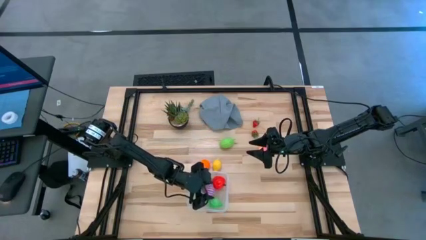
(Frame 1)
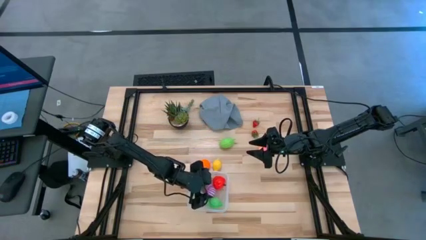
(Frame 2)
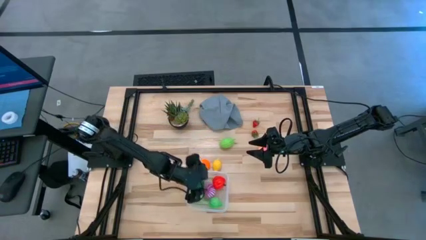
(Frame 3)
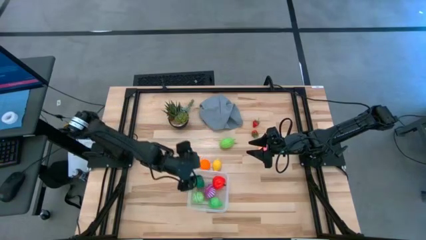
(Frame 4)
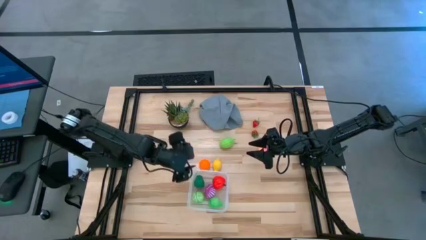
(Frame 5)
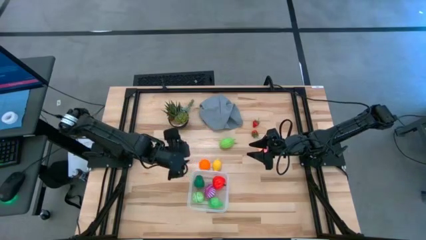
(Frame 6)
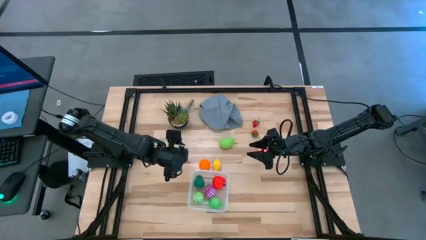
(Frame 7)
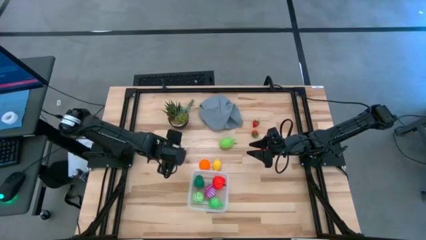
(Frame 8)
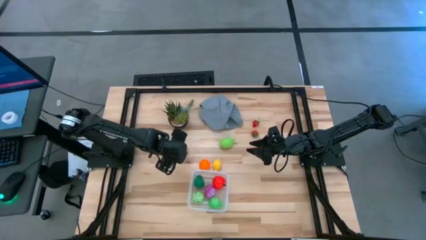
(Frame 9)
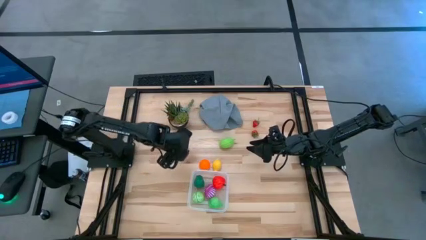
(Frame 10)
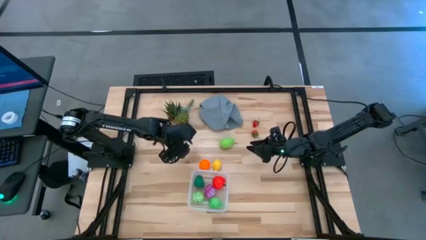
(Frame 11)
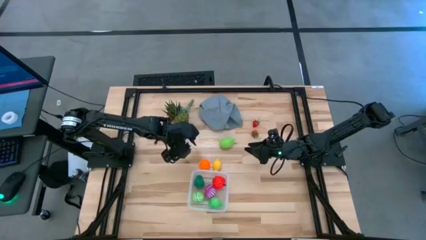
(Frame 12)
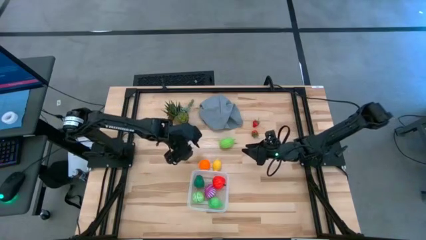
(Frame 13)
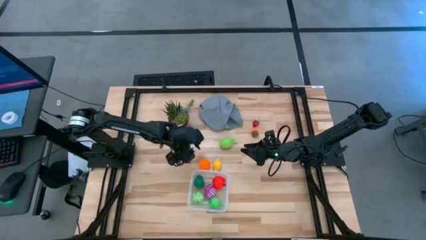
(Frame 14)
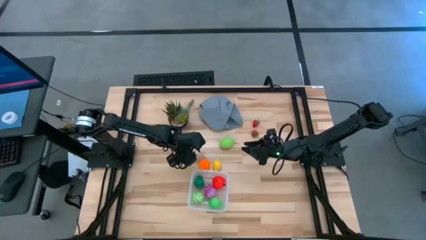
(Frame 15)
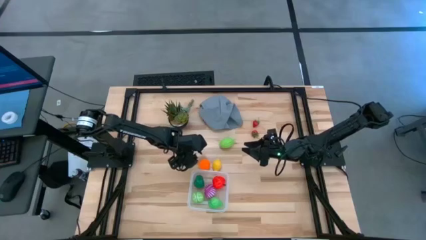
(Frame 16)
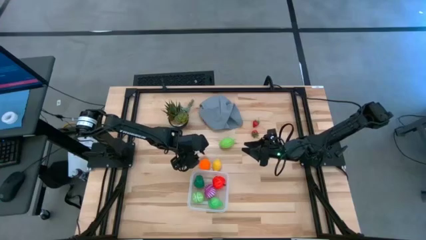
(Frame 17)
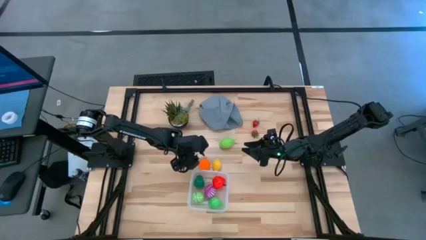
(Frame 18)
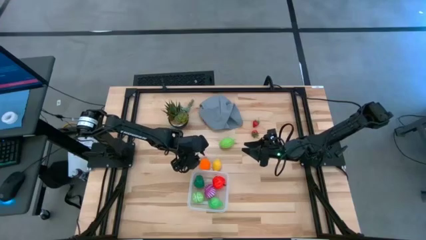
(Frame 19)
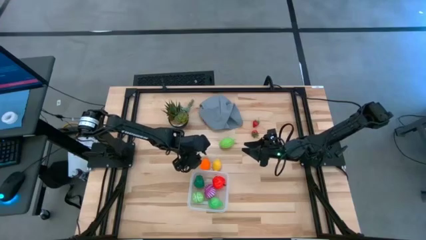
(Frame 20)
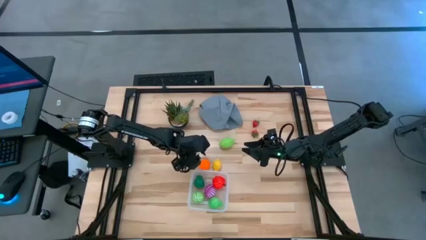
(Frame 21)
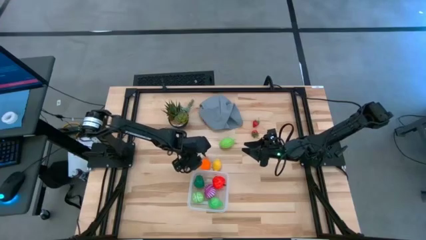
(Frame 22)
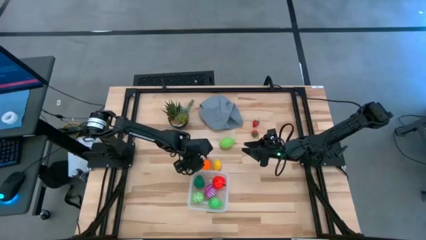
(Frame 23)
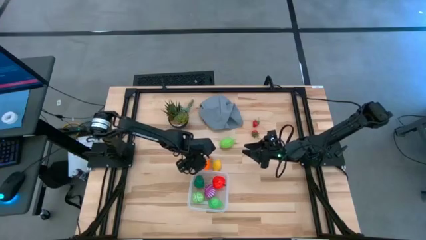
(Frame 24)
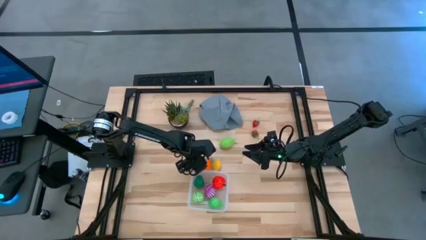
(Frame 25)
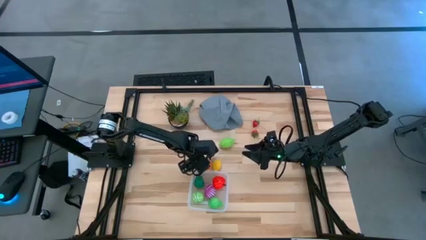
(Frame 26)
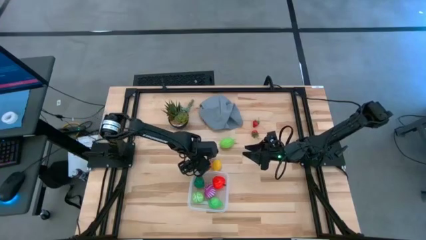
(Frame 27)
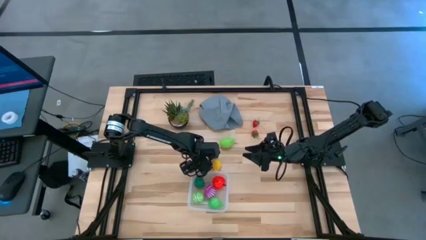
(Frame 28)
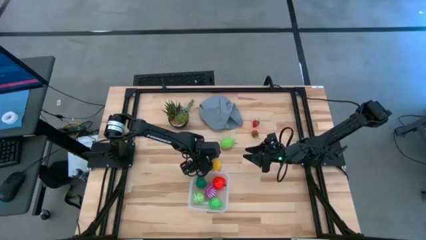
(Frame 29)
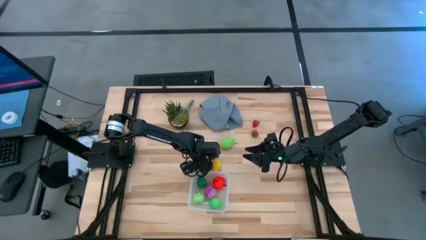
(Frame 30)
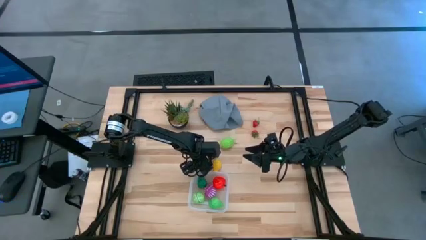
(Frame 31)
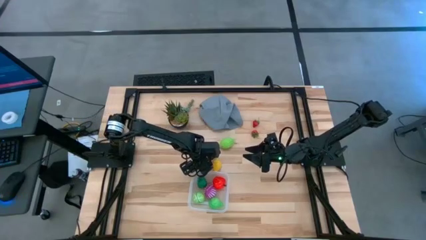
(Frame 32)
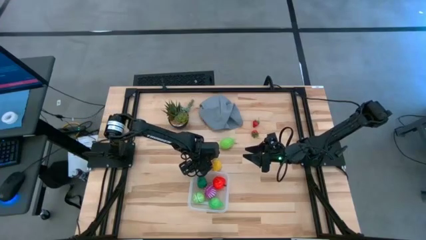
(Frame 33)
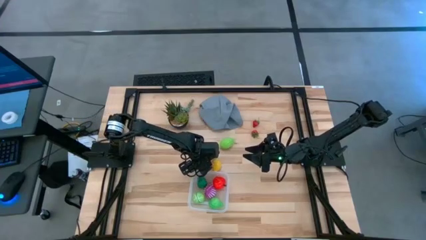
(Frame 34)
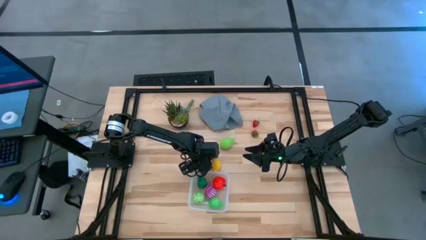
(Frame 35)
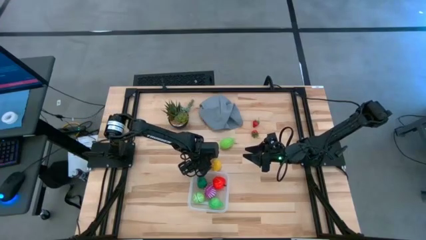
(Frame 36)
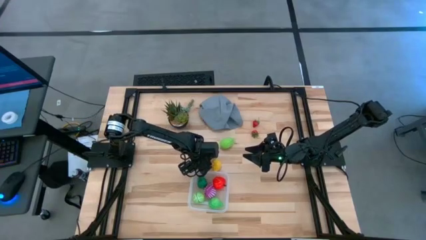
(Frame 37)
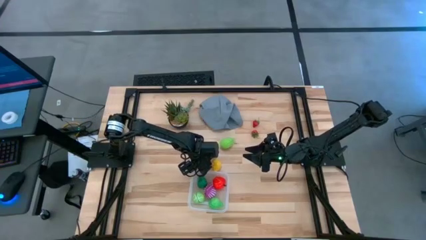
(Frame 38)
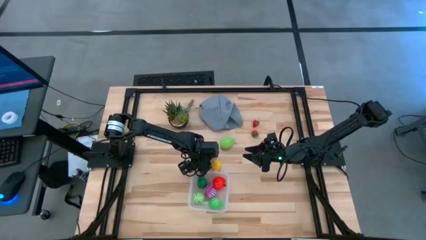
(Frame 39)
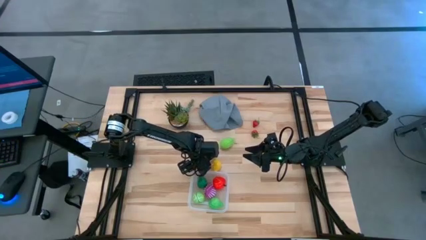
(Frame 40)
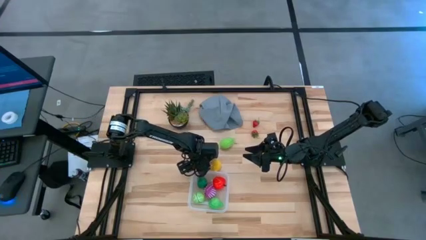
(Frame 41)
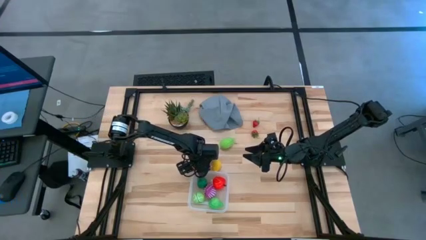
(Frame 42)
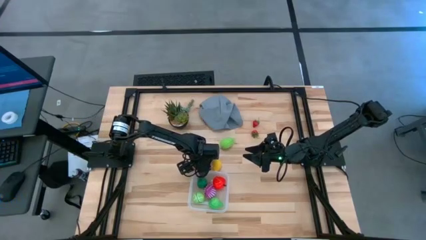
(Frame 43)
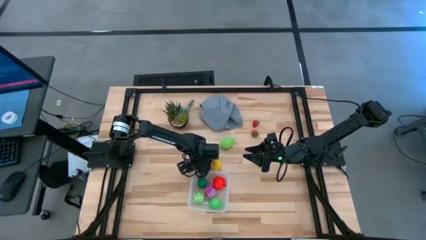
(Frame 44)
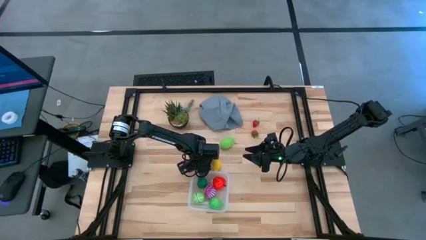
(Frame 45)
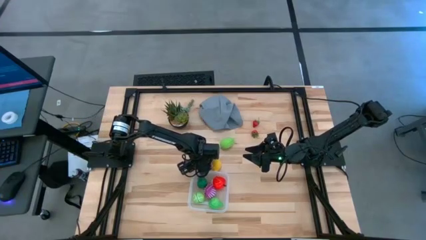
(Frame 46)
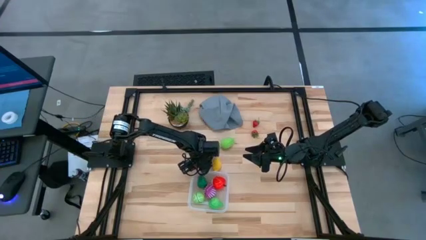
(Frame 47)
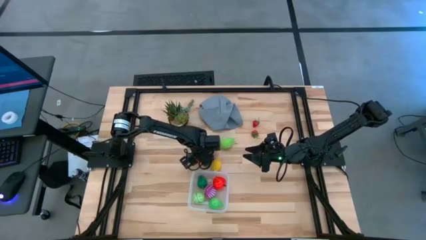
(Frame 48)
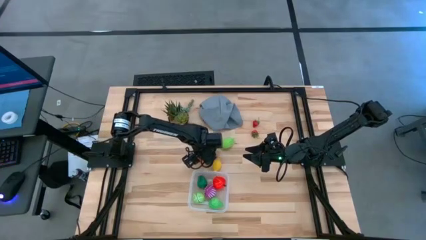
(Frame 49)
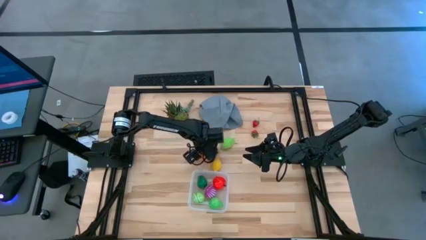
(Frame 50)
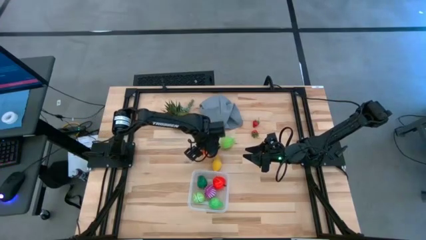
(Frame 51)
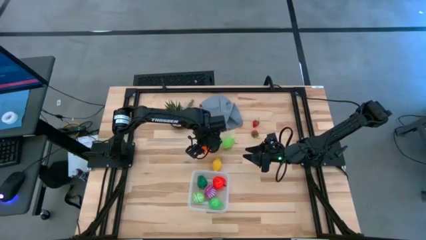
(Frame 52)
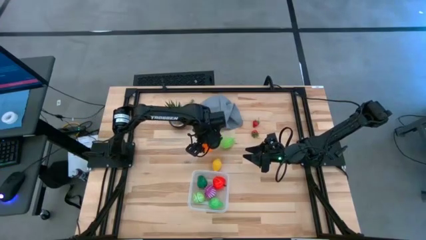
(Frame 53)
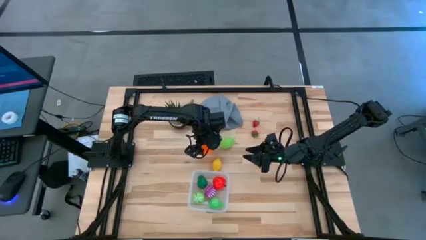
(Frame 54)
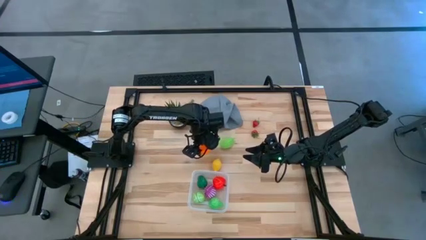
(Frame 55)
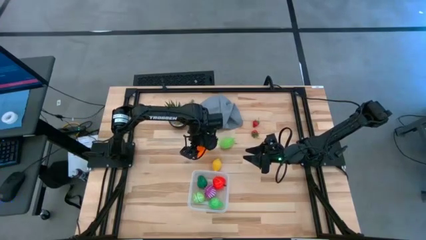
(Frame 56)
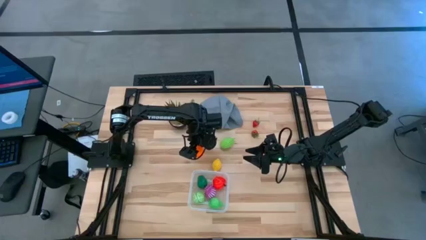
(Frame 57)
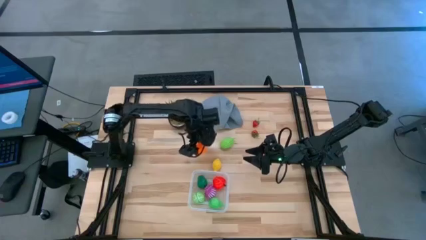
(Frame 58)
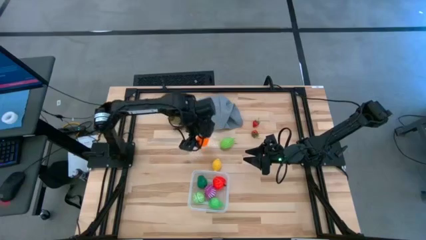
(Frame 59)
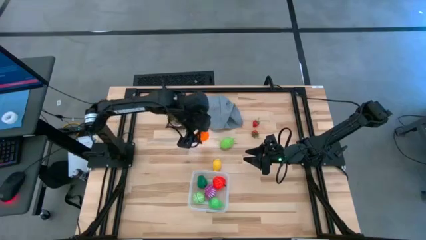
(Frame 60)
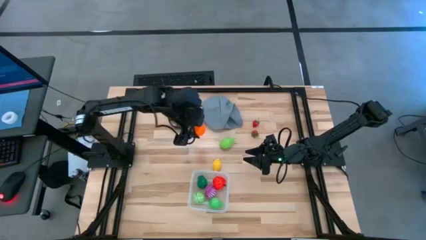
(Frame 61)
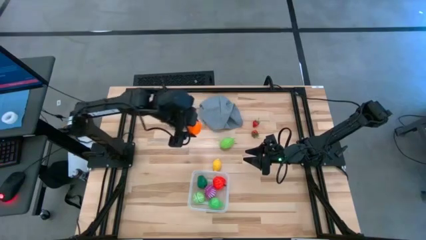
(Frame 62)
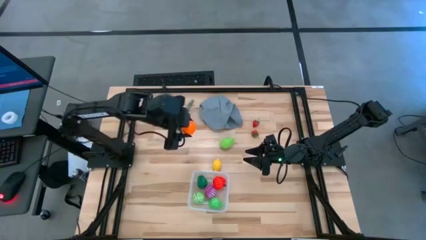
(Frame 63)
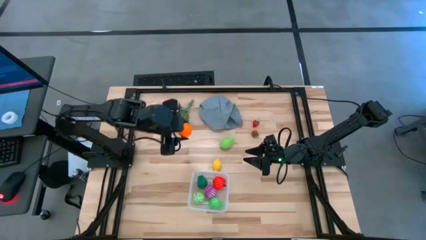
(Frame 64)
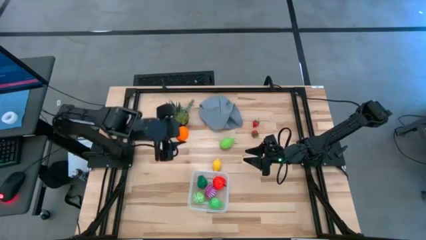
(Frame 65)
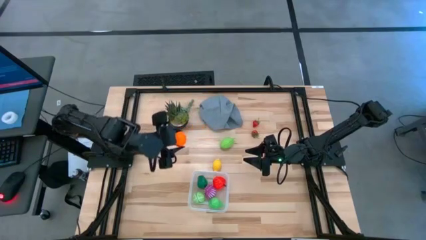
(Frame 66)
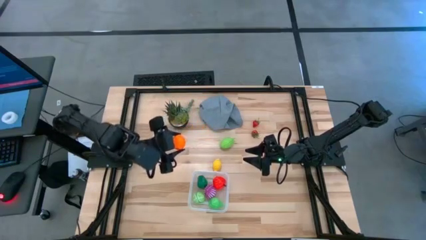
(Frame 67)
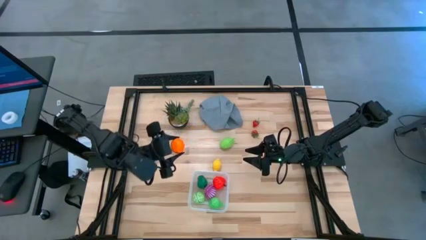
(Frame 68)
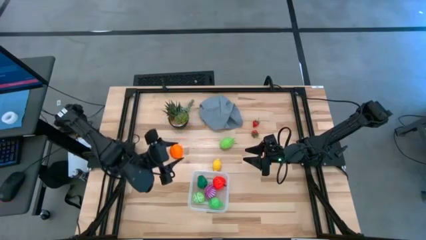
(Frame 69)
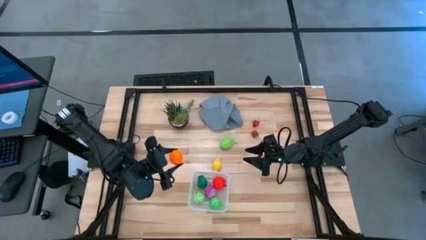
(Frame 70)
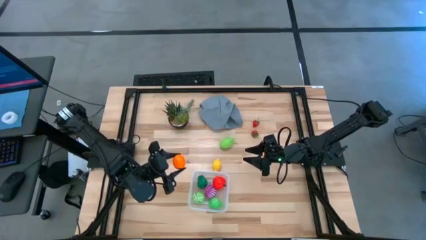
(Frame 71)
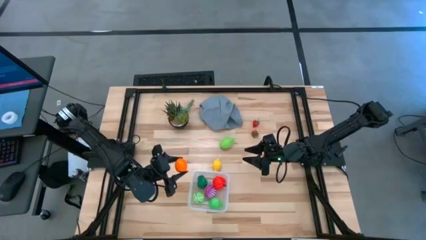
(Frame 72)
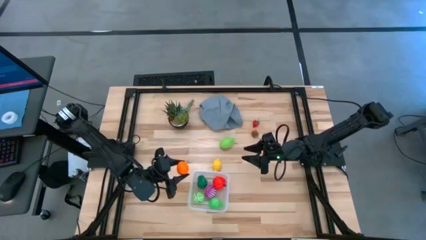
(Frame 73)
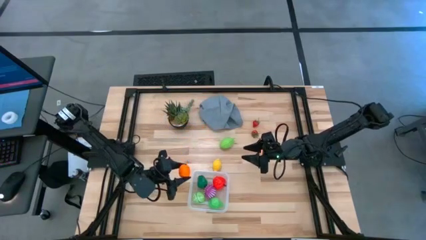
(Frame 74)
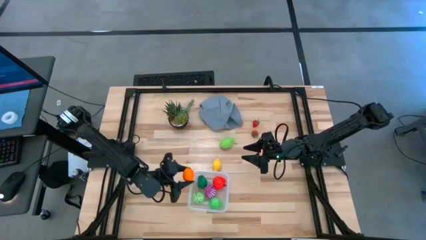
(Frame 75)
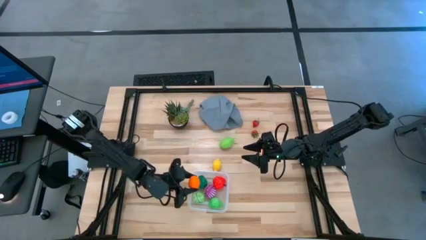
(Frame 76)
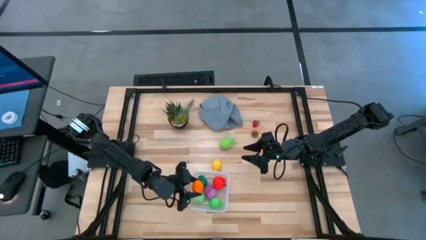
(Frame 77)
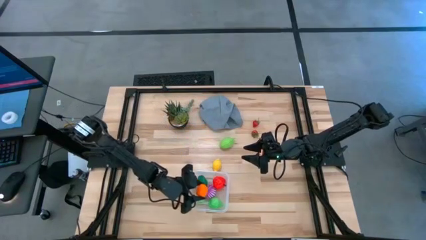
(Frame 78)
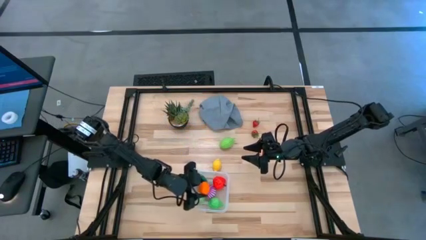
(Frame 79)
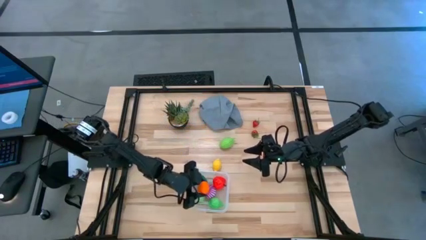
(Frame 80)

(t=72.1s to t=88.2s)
Task: Pick and placing Produce into tupperware
Put the pumpkin into the transparent bin
